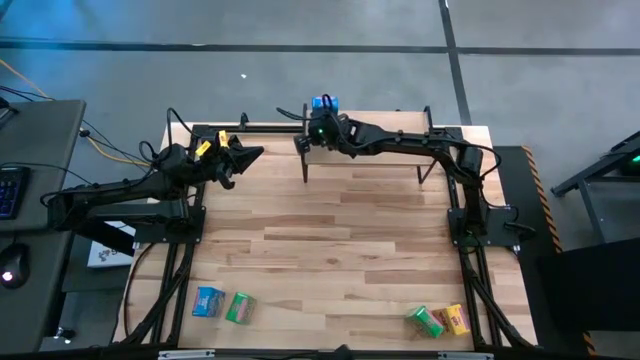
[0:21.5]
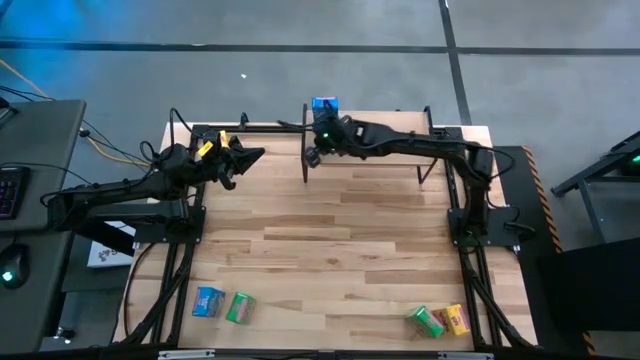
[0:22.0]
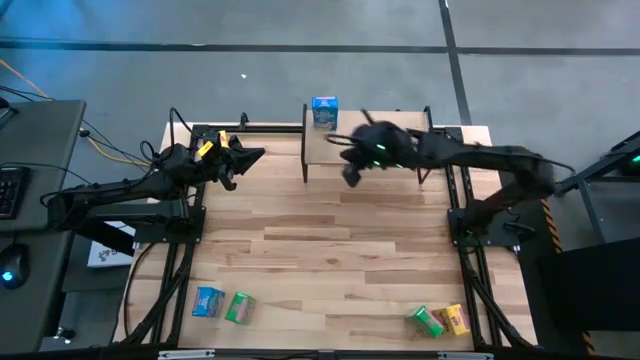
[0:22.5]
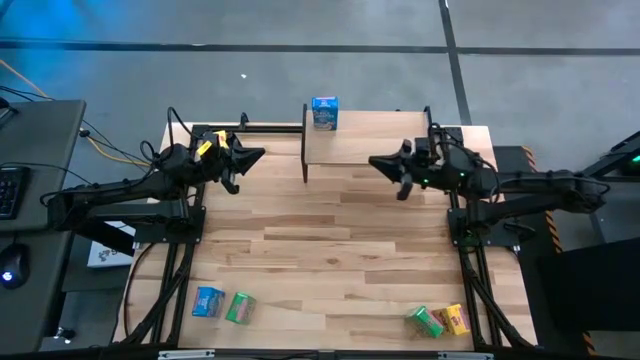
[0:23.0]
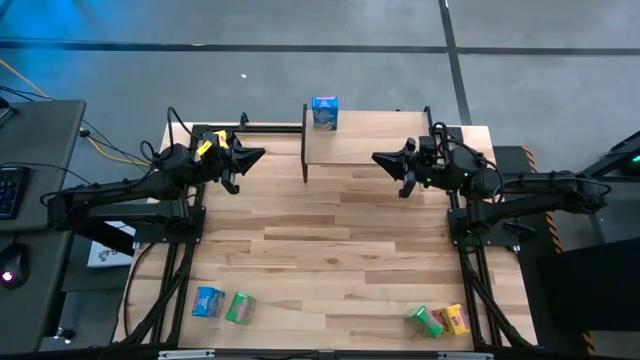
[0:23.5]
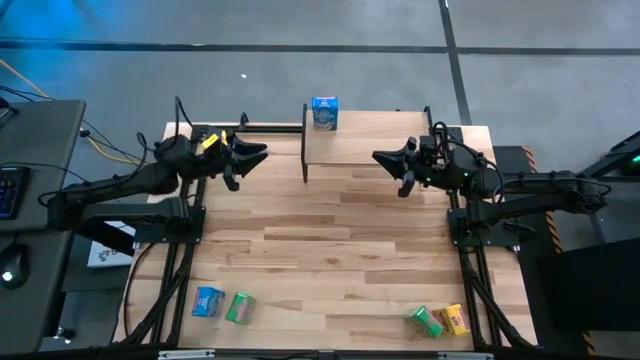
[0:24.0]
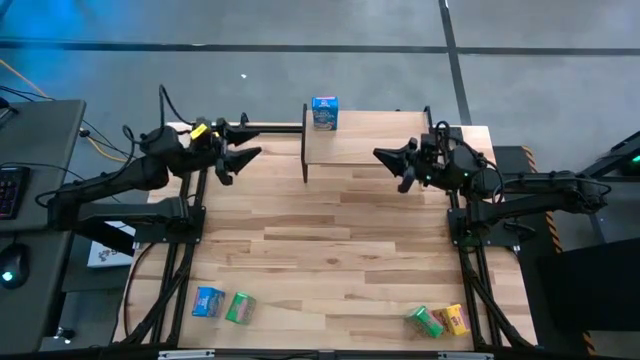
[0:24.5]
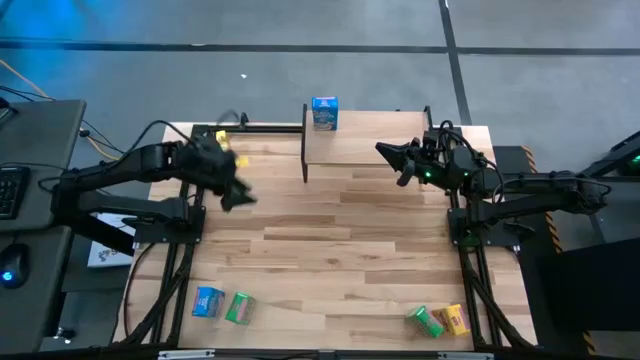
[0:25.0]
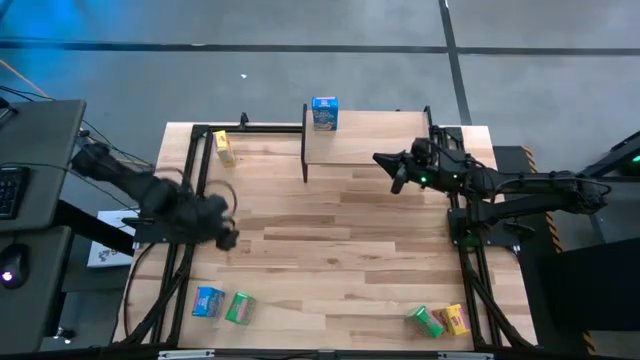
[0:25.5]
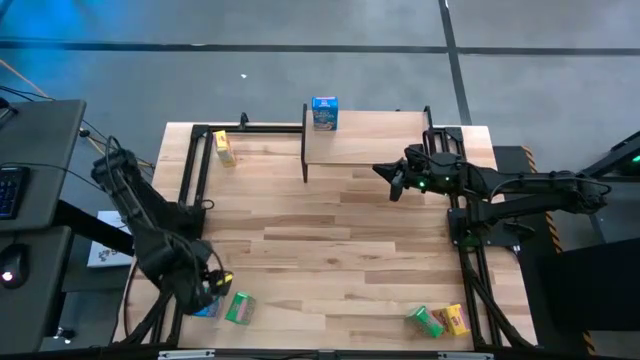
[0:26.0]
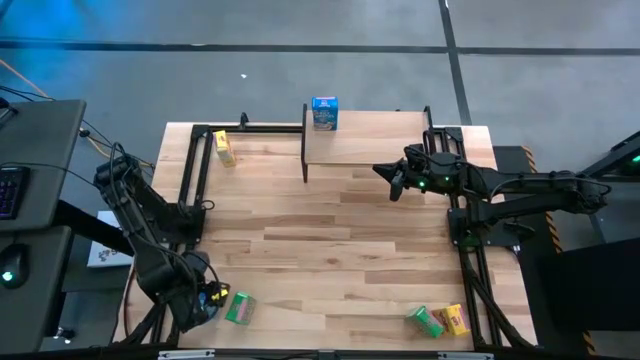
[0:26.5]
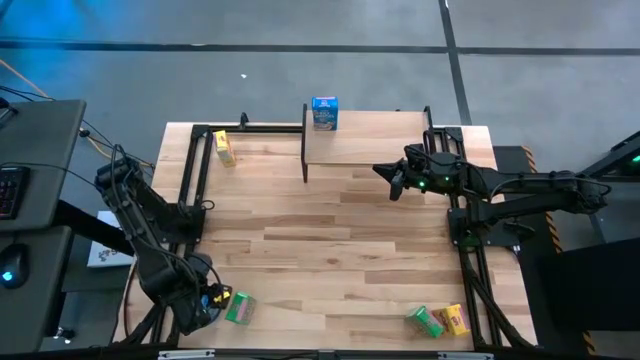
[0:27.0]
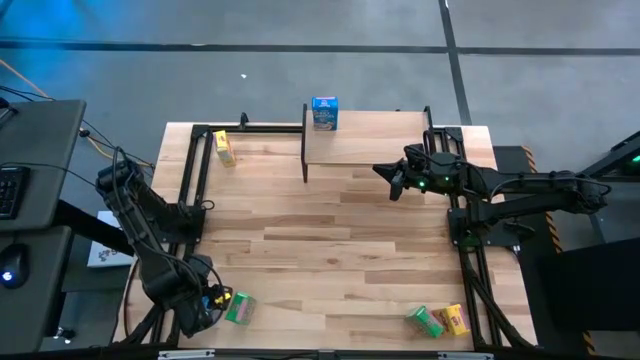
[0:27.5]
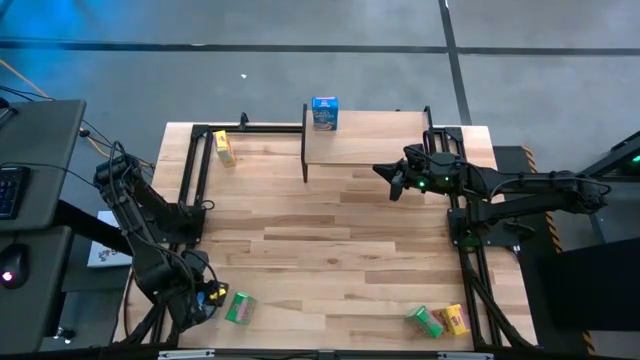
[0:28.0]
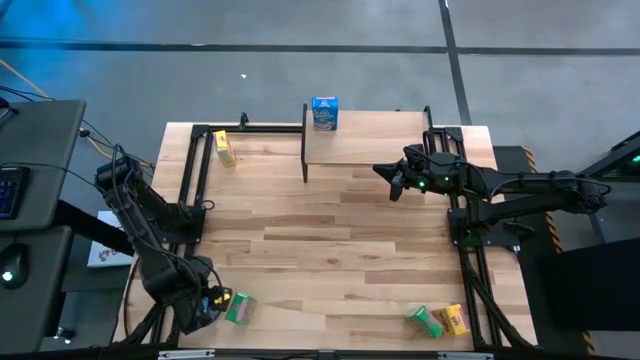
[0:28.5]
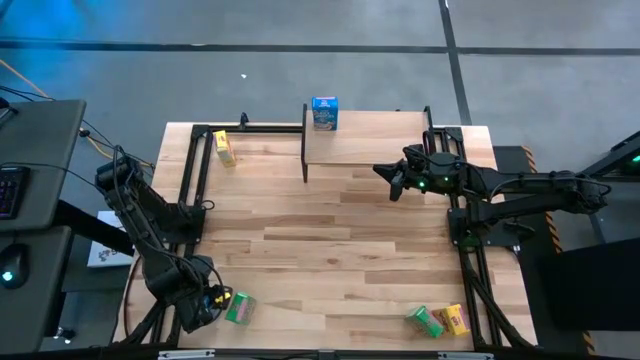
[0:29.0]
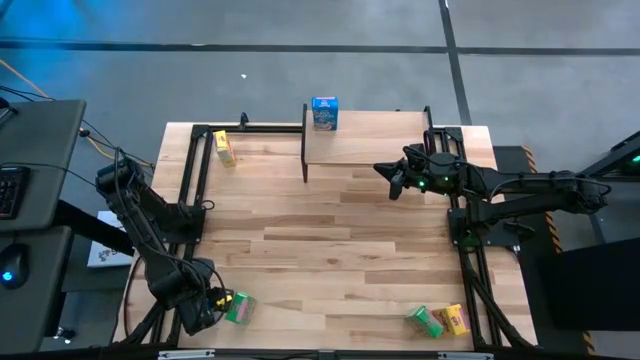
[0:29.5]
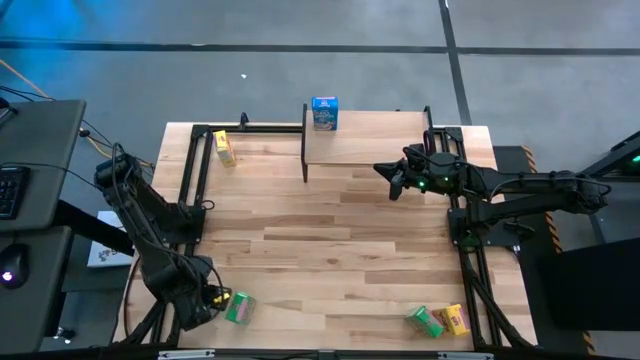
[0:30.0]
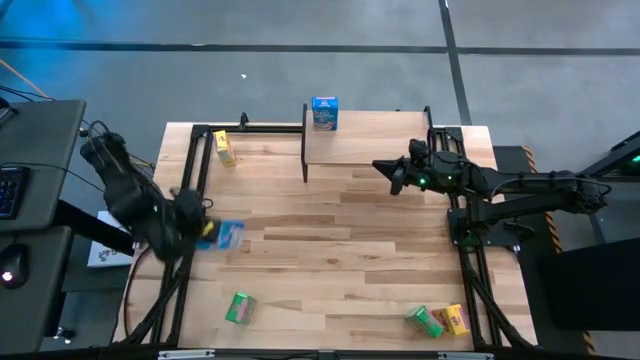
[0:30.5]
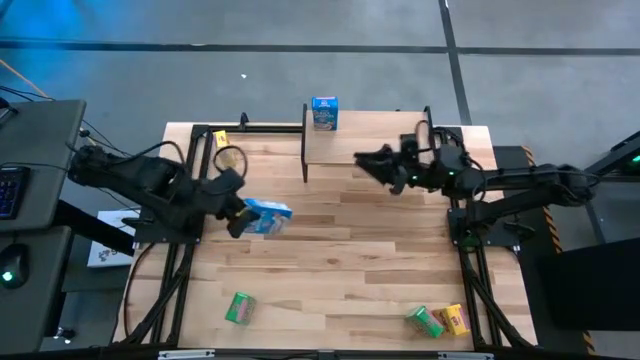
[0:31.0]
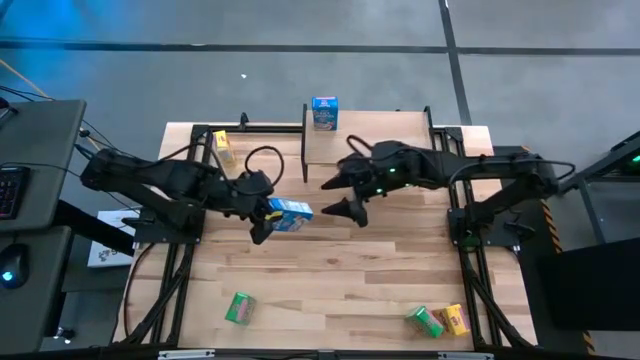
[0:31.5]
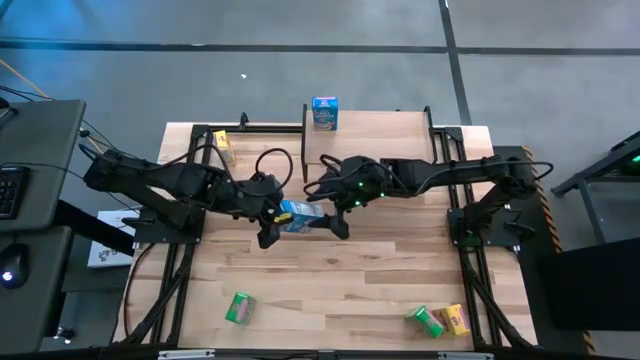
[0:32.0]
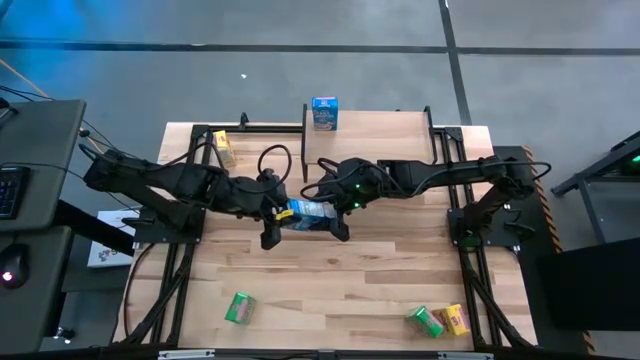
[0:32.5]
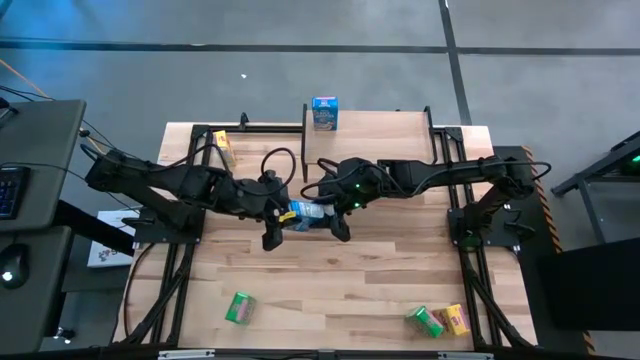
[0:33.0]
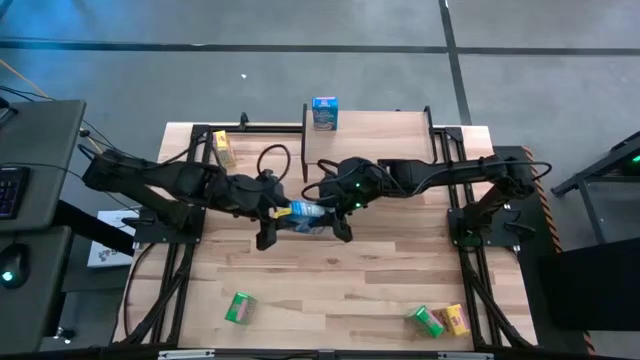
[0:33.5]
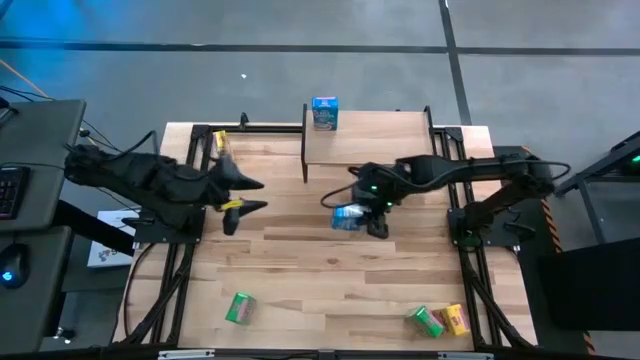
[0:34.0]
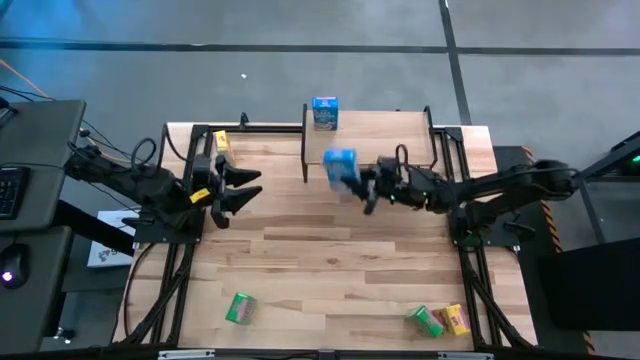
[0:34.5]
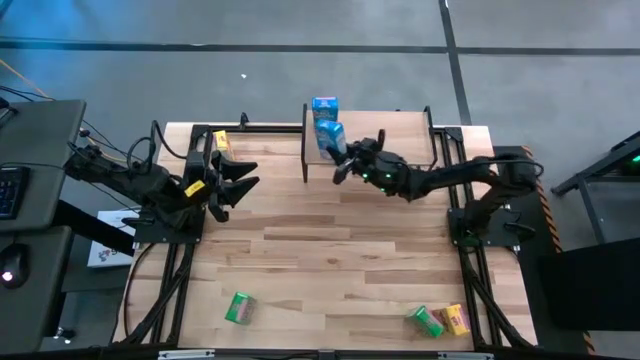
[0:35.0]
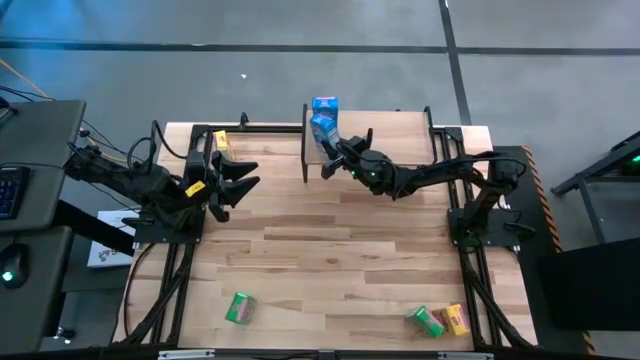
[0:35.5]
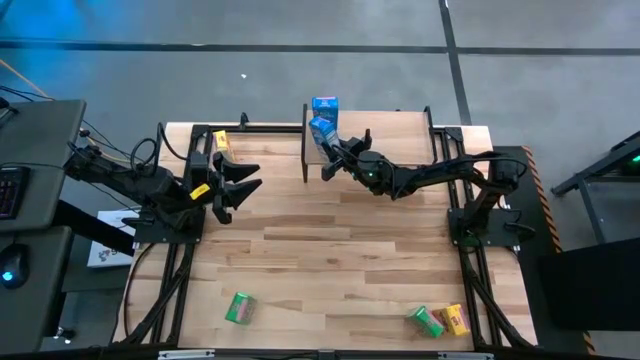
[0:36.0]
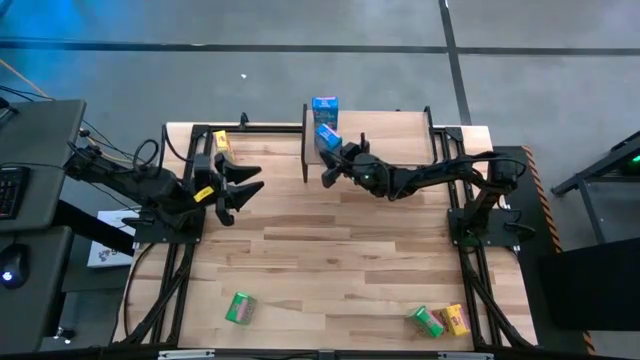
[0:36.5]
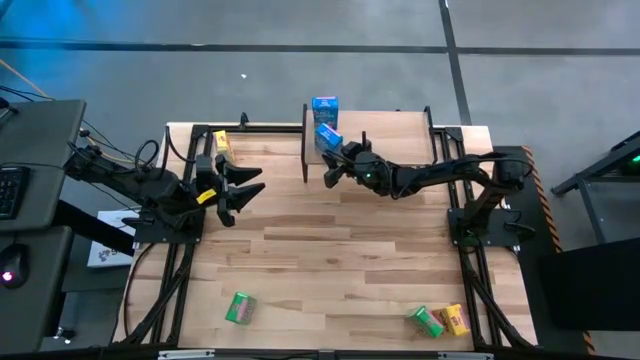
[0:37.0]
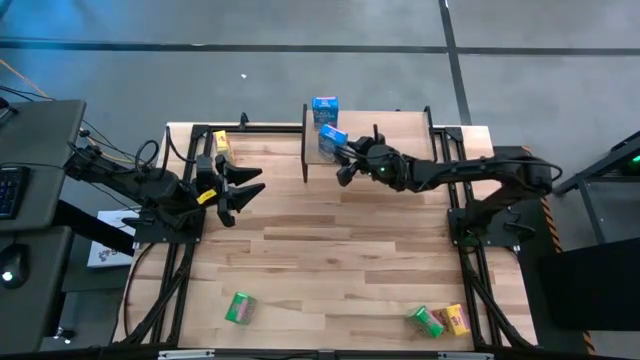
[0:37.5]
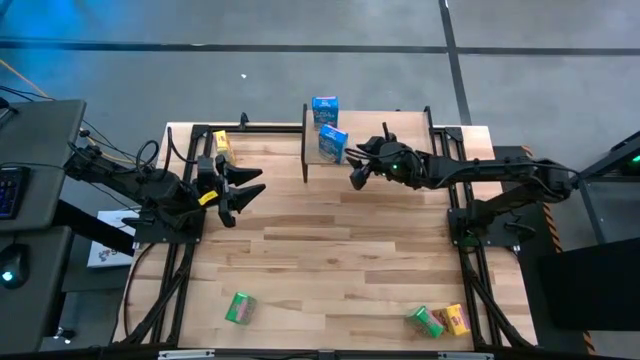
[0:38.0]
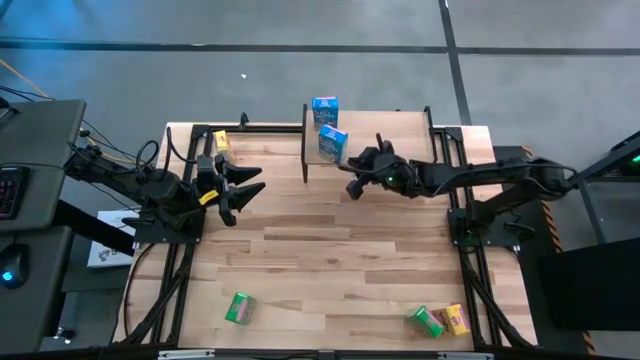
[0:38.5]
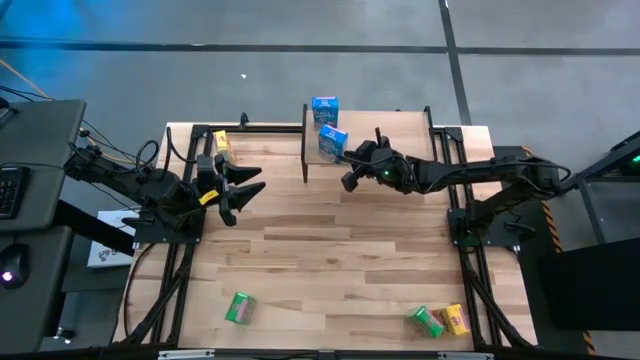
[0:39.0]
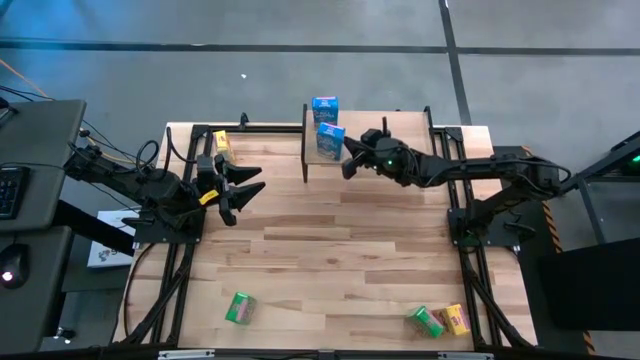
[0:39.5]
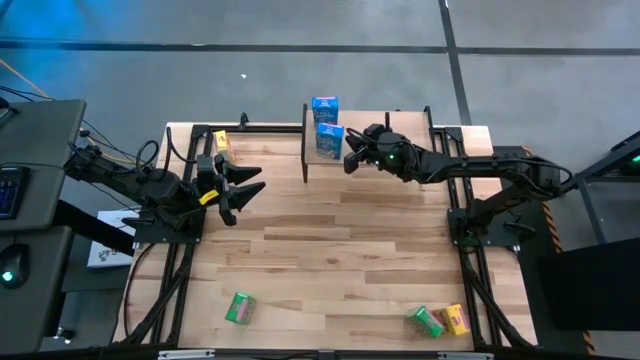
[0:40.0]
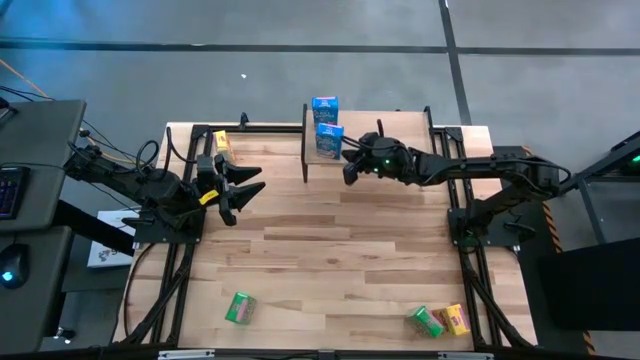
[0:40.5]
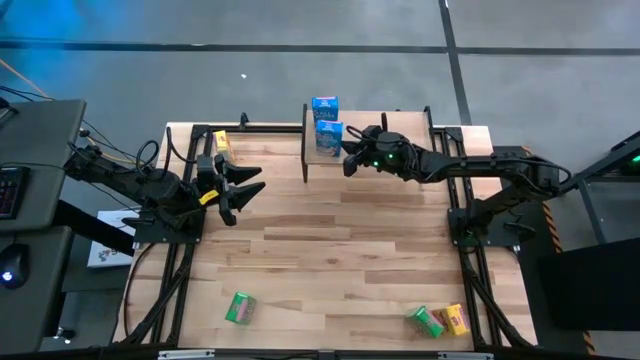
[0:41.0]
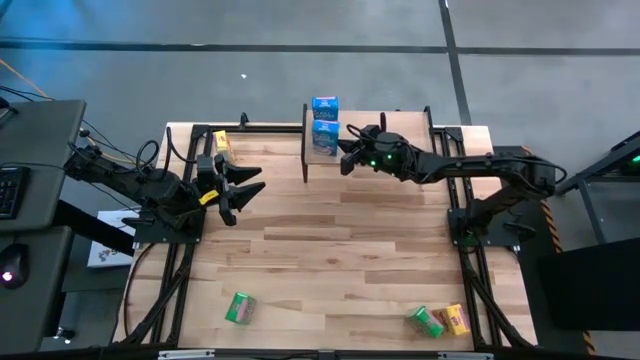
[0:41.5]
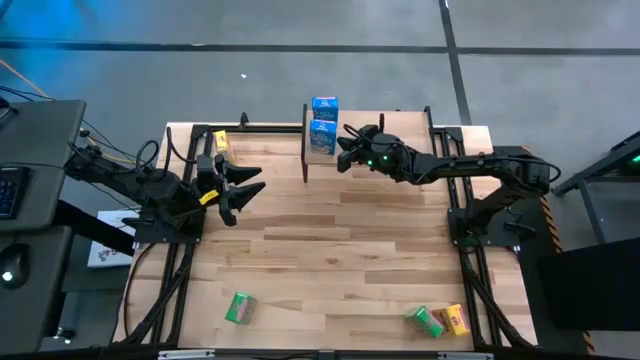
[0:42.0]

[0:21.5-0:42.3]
Task: Stack cereal on shelf
Put the blue cereal box on the shelf
